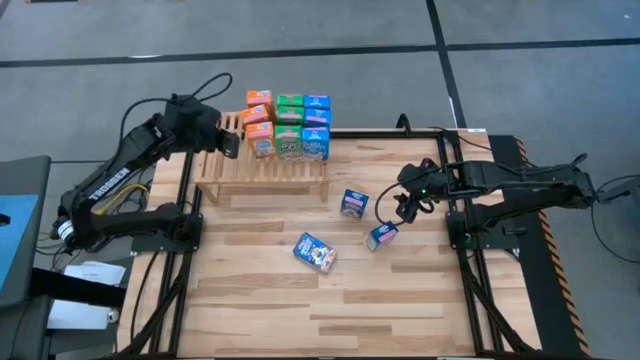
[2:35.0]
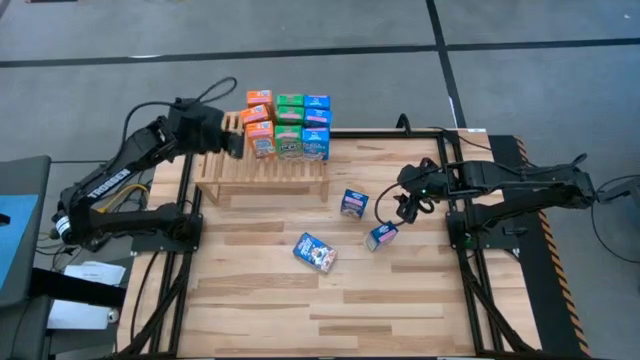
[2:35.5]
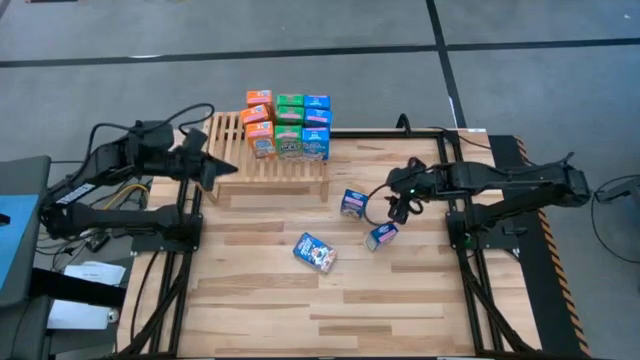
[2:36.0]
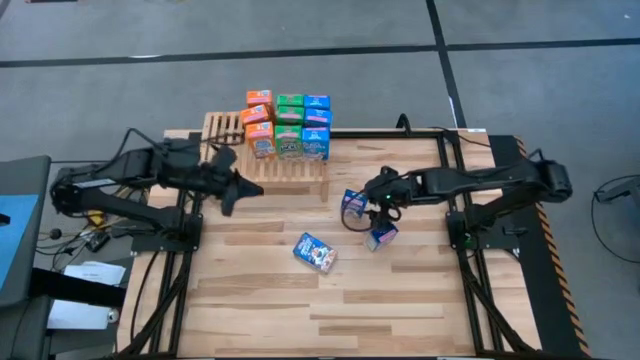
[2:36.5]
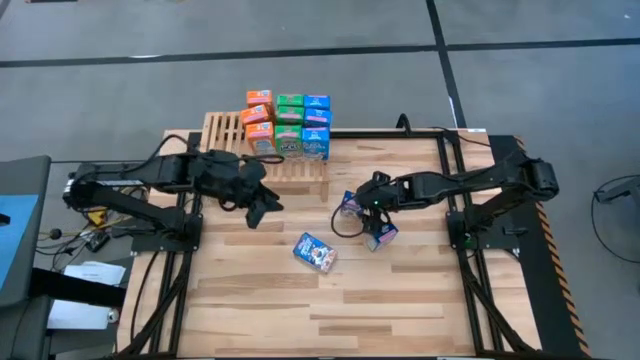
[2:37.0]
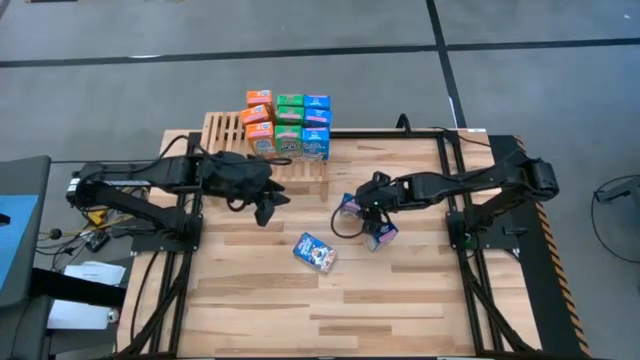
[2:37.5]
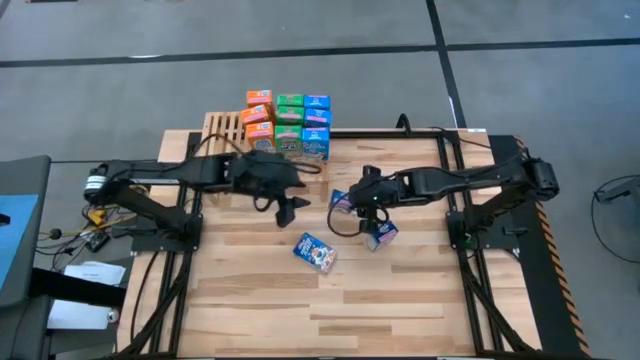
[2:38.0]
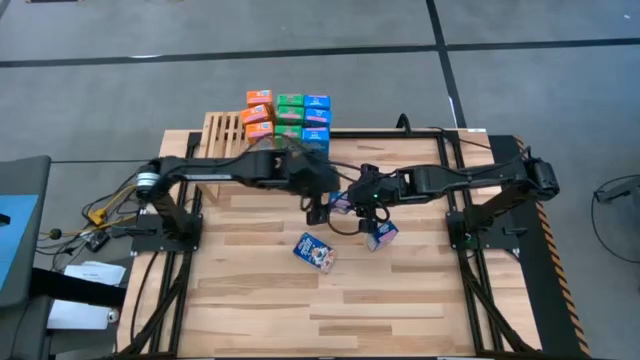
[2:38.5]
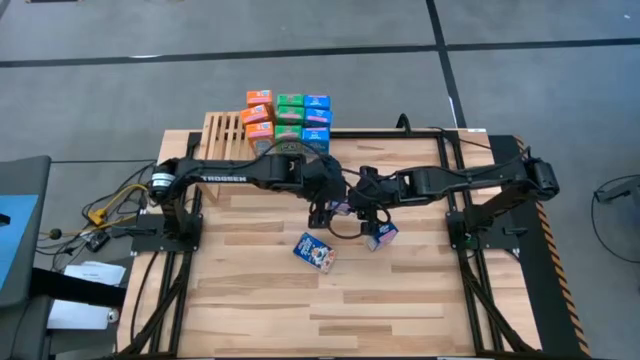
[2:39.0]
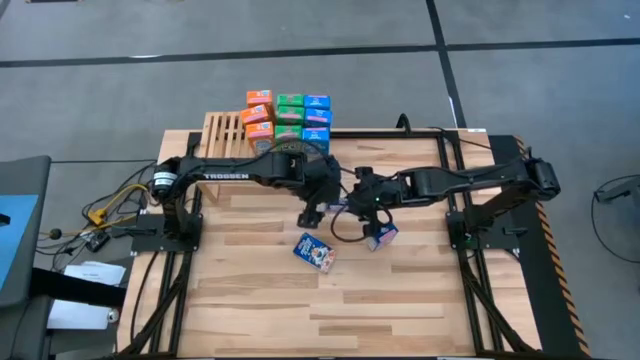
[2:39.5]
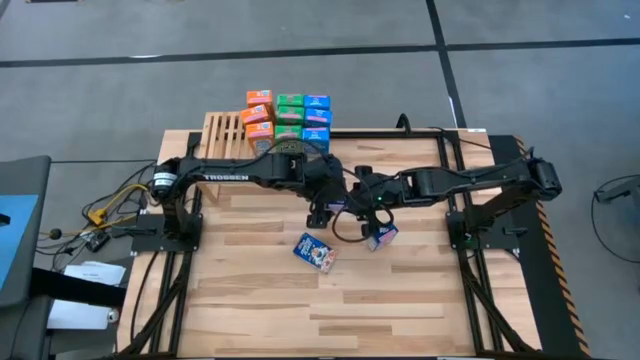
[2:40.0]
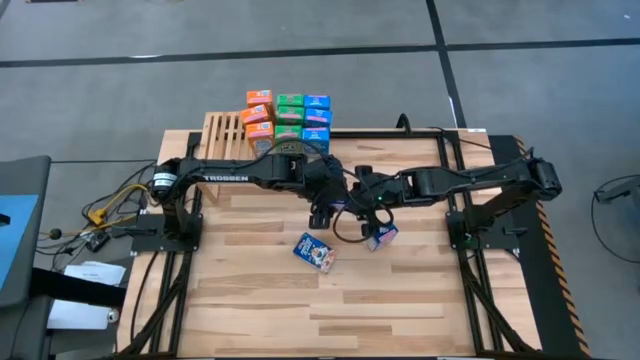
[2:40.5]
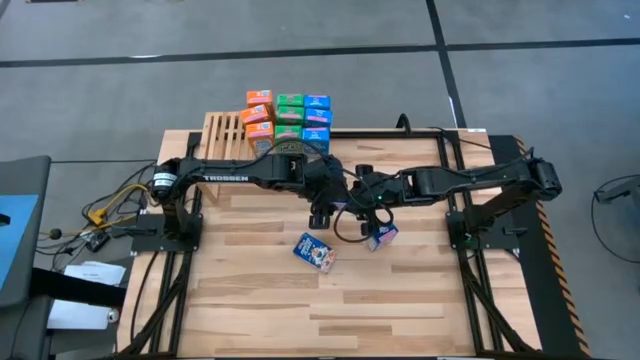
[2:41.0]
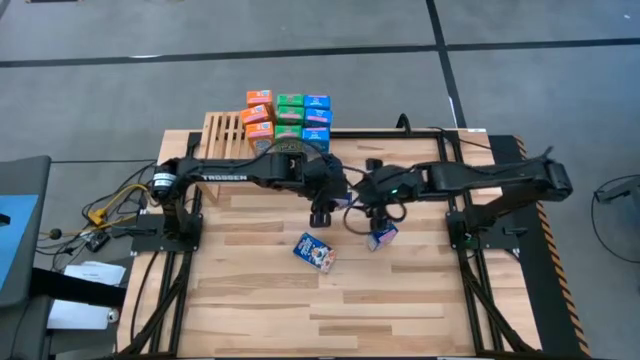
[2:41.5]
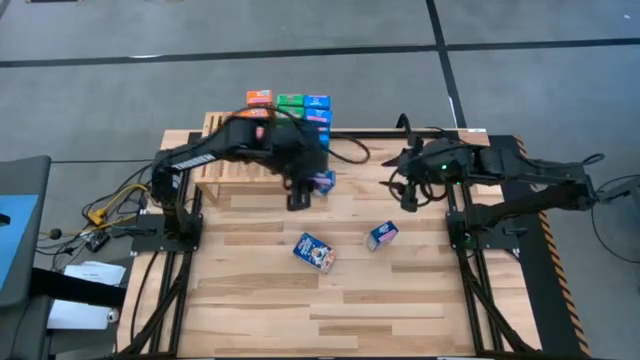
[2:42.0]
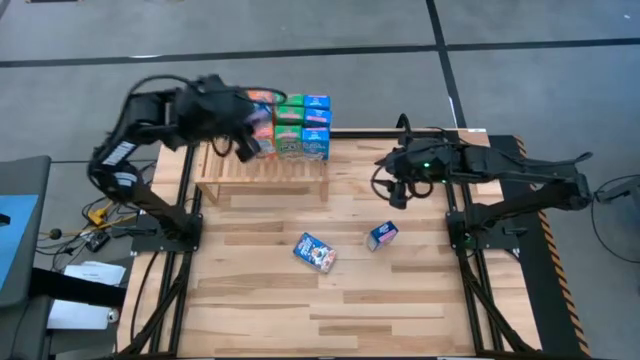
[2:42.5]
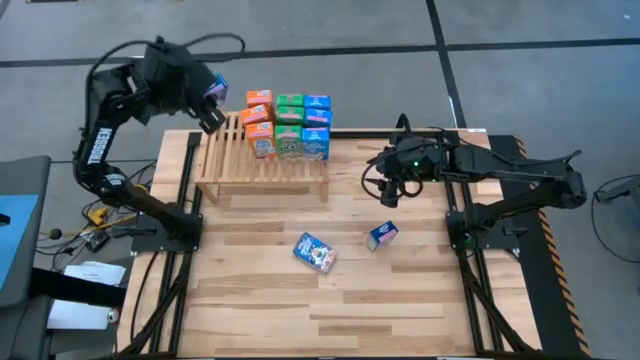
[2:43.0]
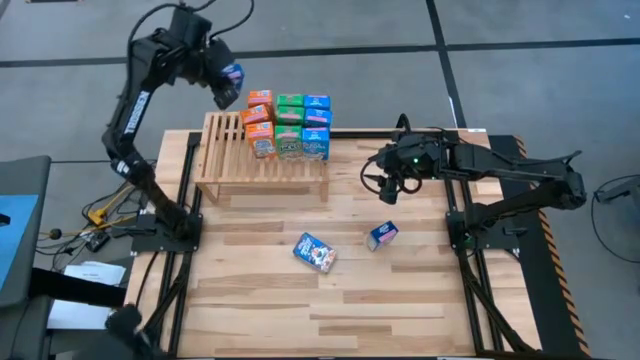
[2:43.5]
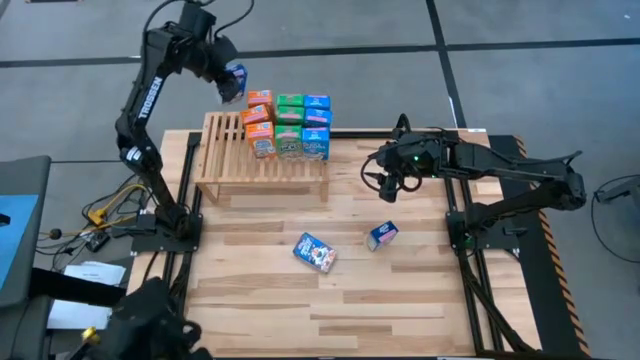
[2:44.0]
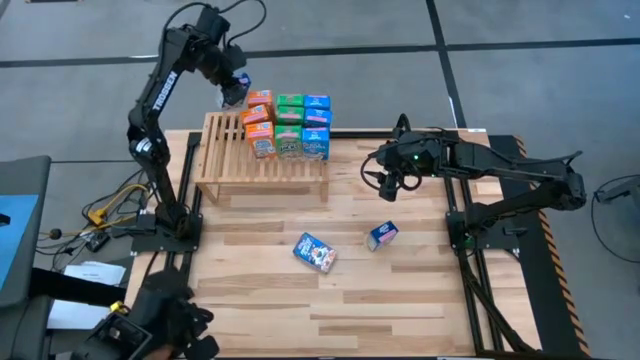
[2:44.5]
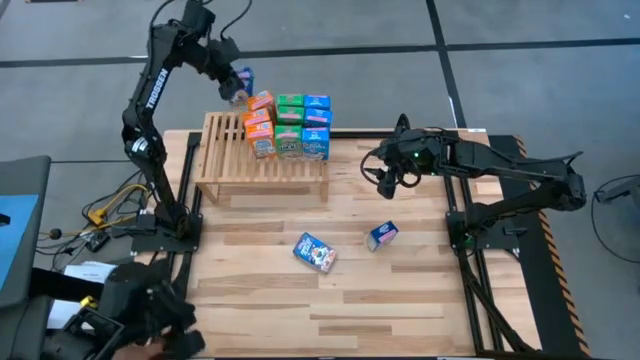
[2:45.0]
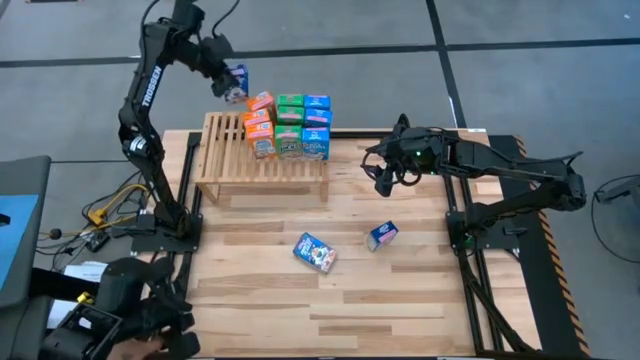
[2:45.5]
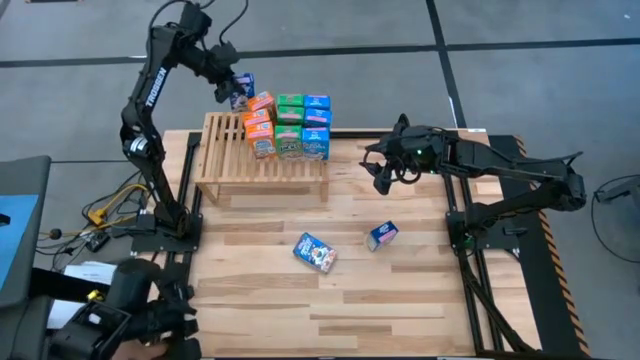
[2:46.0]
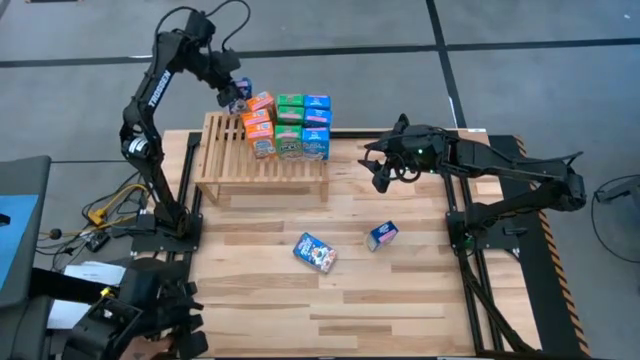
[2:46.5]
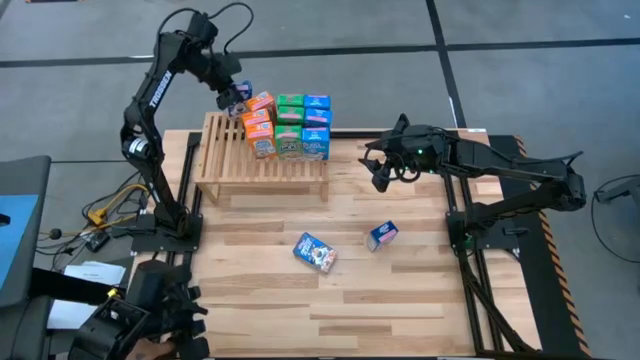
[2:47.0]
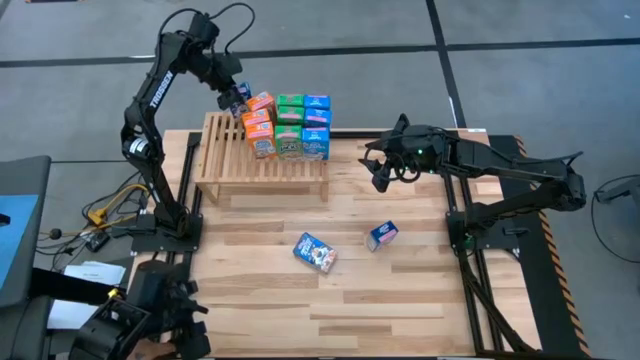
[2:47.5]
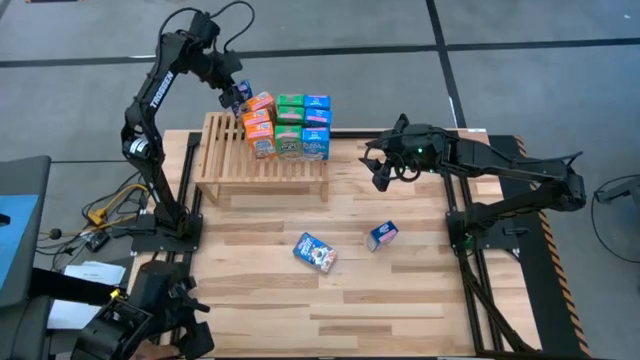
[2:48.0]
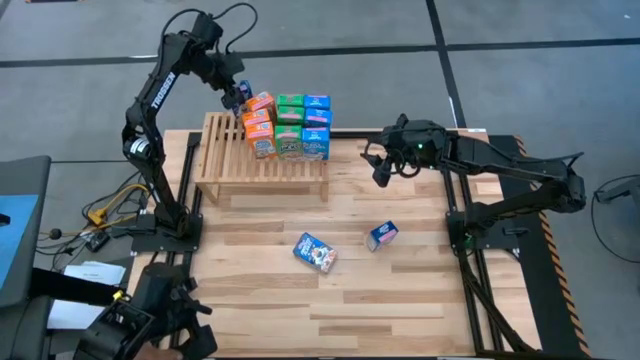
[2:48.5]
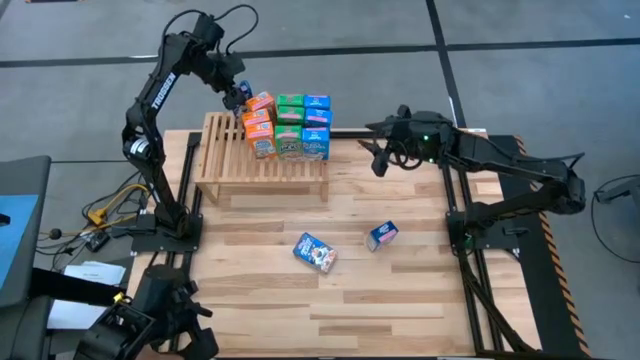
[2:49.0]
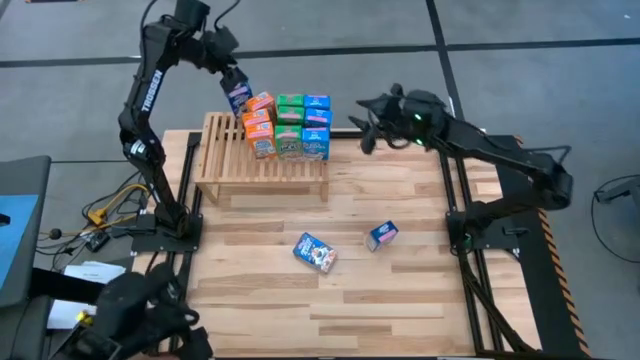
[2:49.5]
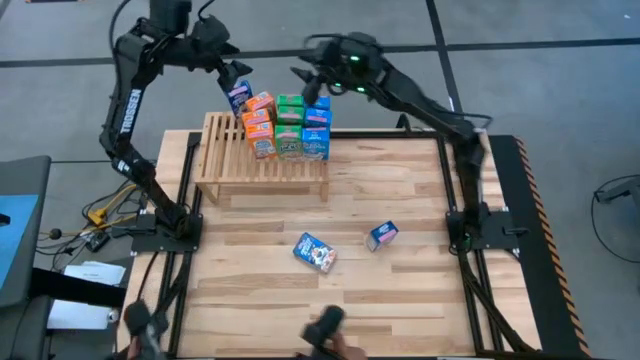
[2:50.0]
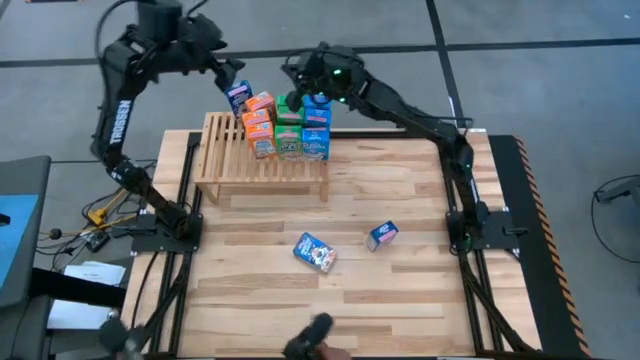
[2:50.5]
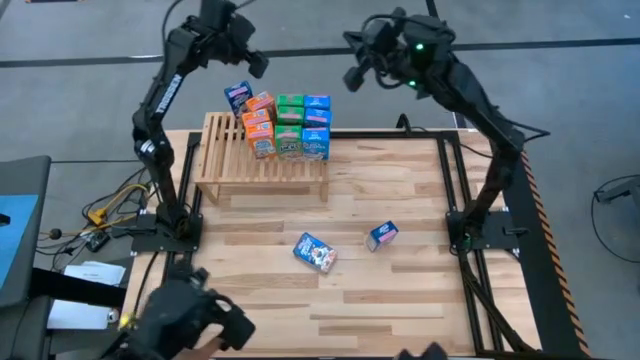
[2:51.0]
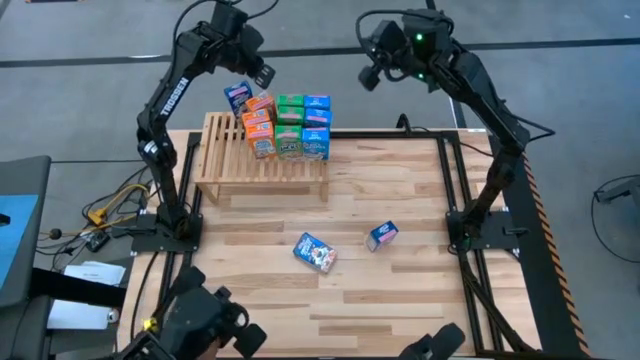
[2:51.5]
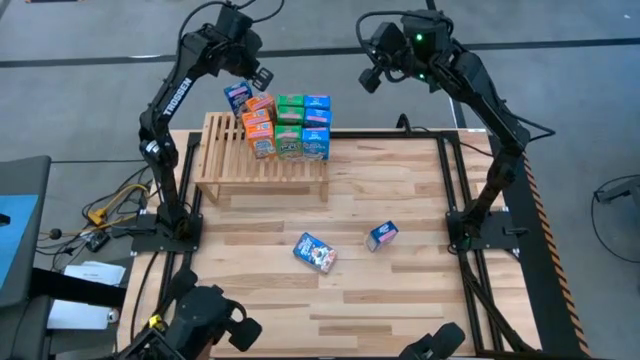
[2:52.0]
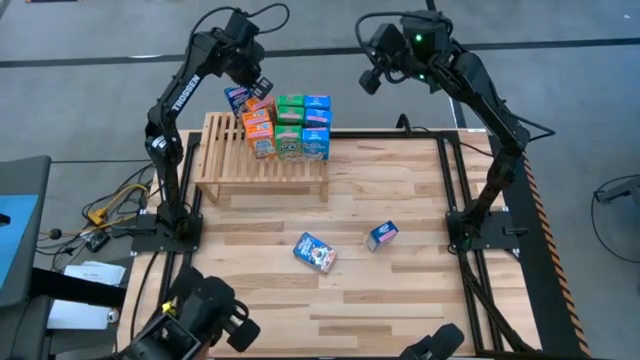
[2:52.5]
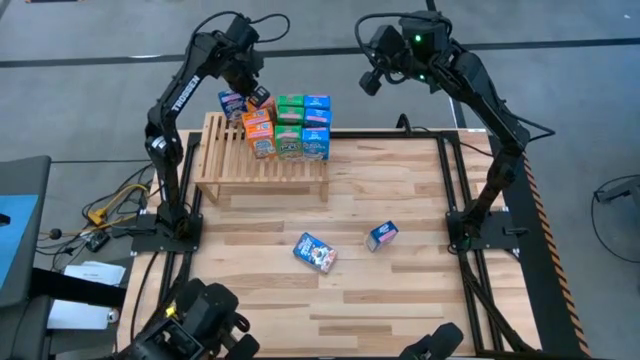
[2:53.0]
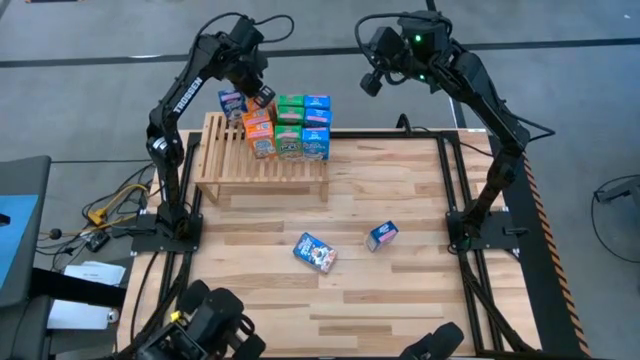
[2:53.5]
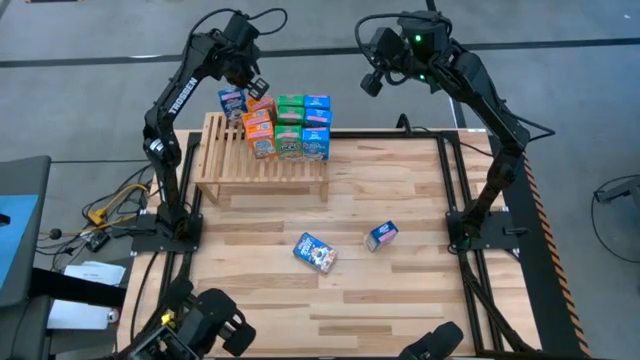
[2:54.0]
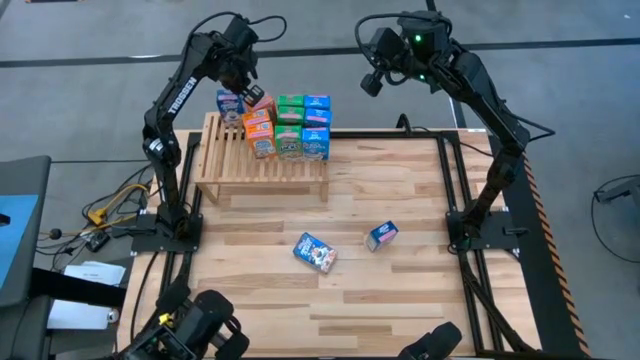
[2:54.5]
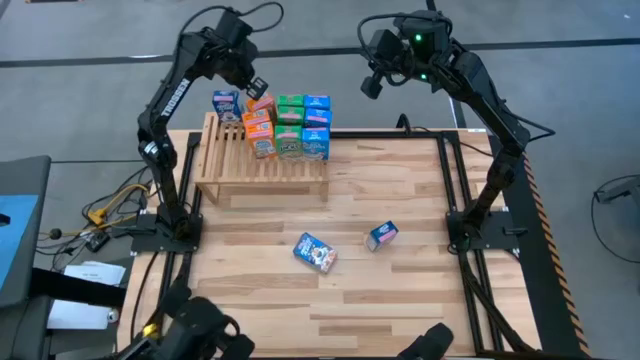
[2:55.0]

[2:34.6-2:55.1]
Task: Stack cereal on shelf
Put the top blue cereal on the shelf
